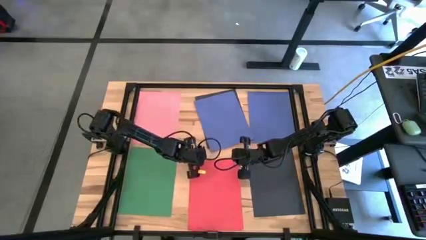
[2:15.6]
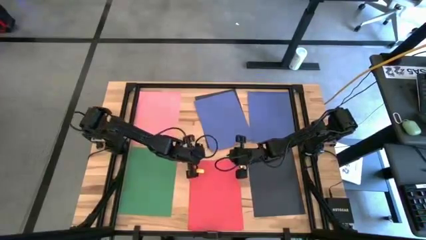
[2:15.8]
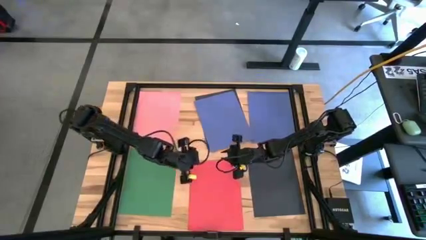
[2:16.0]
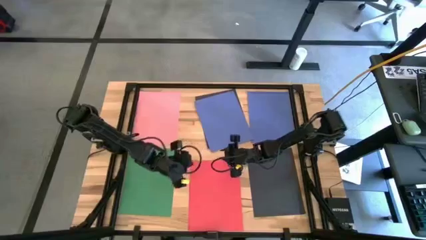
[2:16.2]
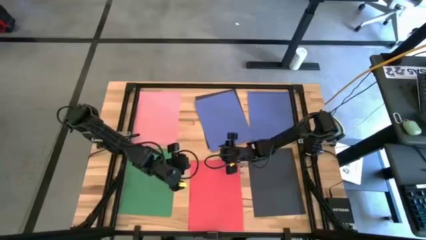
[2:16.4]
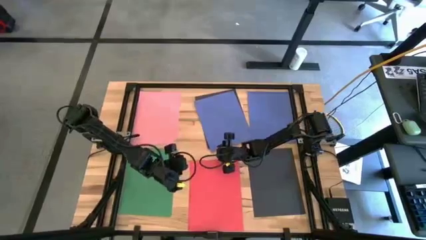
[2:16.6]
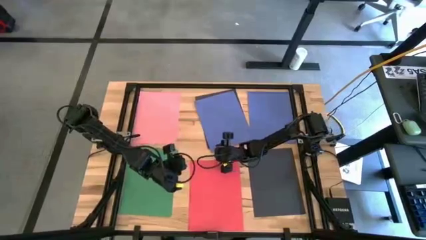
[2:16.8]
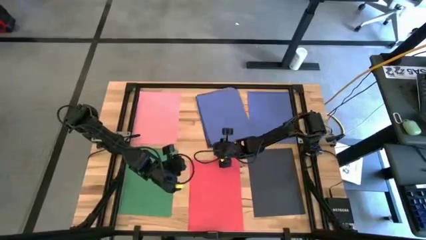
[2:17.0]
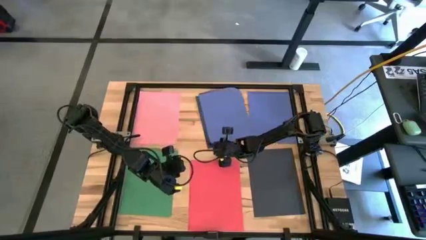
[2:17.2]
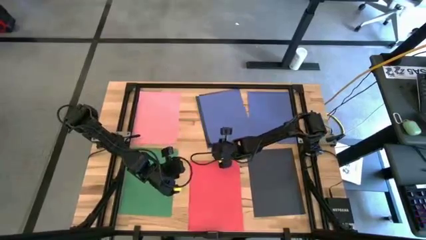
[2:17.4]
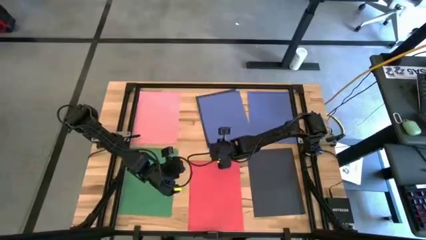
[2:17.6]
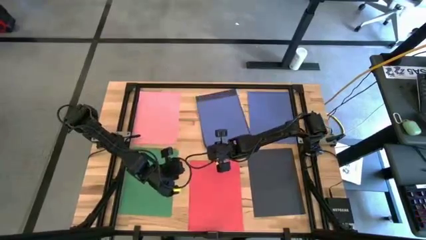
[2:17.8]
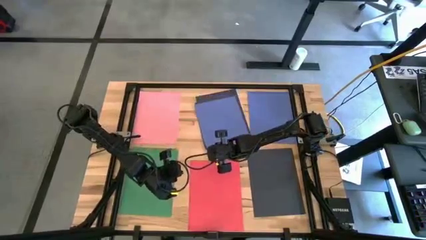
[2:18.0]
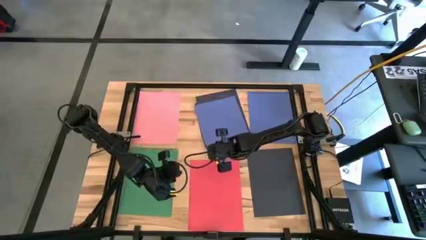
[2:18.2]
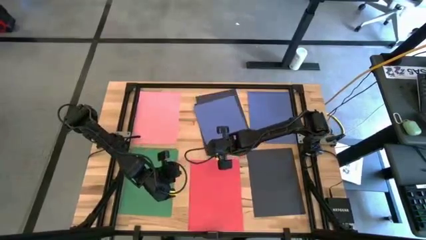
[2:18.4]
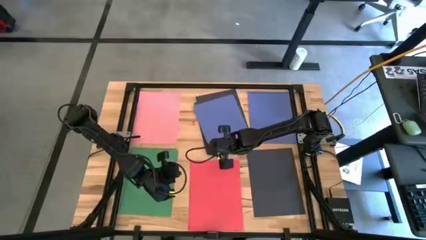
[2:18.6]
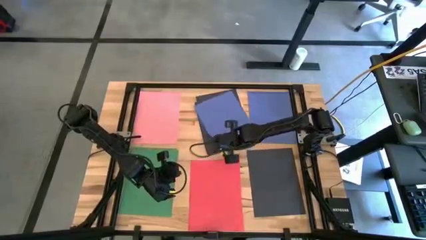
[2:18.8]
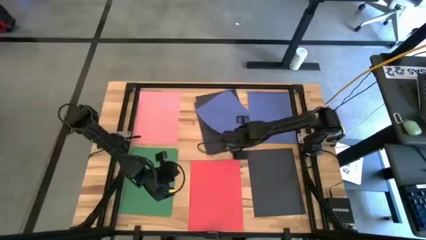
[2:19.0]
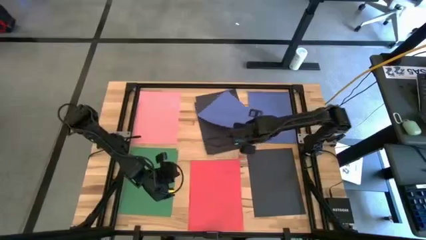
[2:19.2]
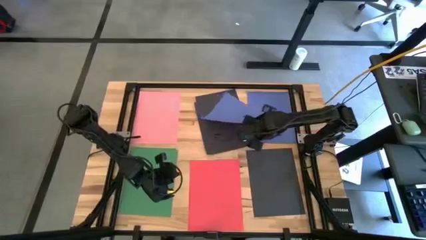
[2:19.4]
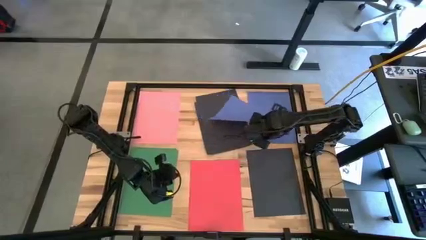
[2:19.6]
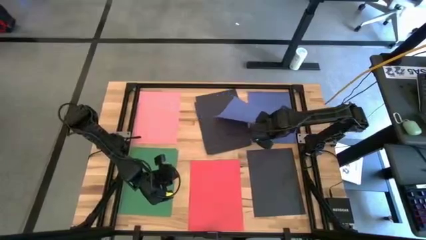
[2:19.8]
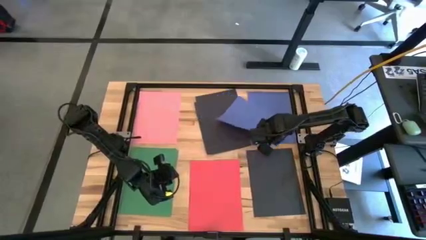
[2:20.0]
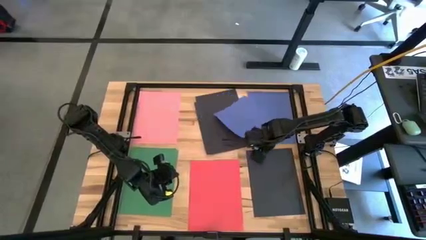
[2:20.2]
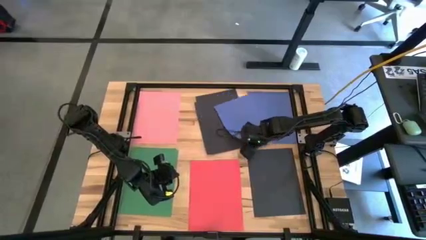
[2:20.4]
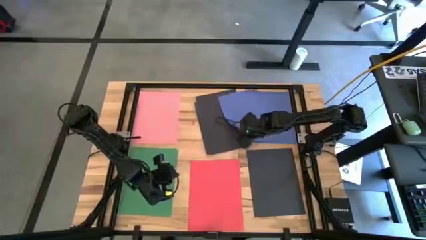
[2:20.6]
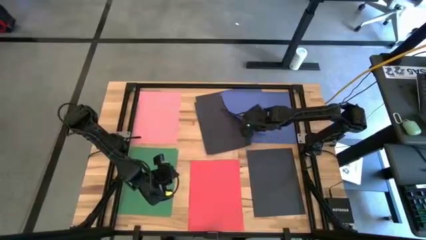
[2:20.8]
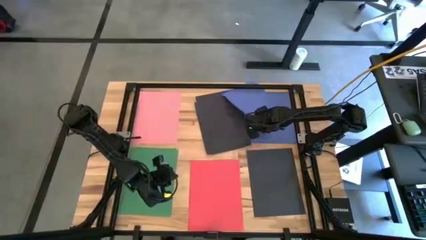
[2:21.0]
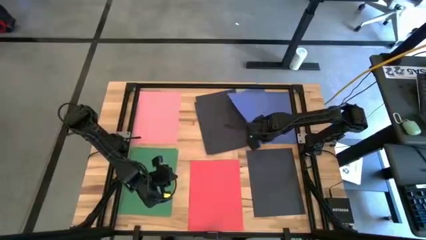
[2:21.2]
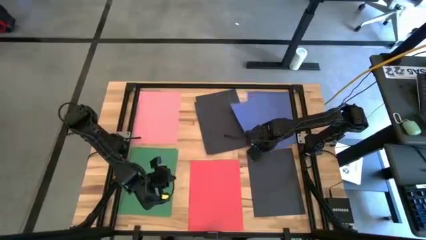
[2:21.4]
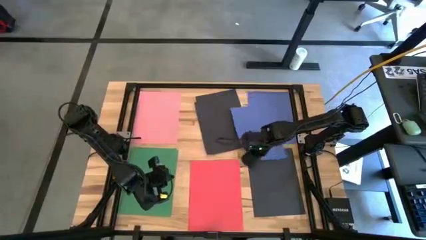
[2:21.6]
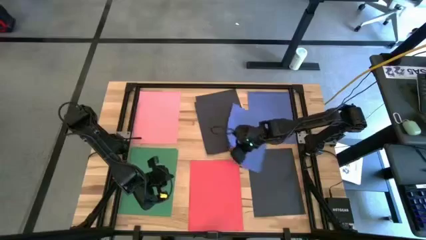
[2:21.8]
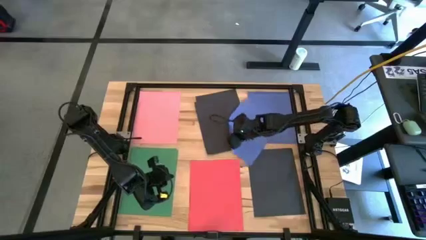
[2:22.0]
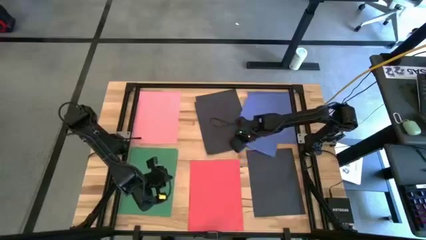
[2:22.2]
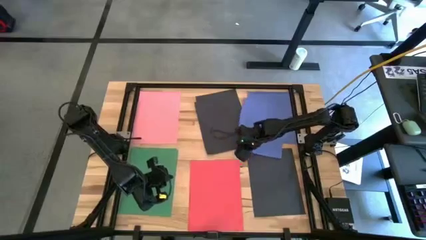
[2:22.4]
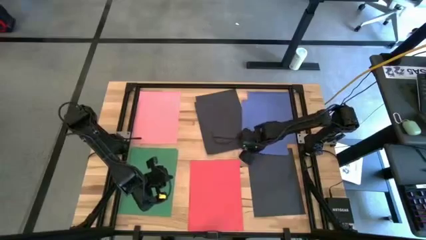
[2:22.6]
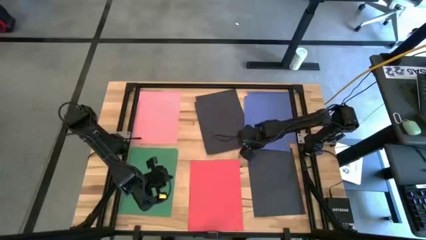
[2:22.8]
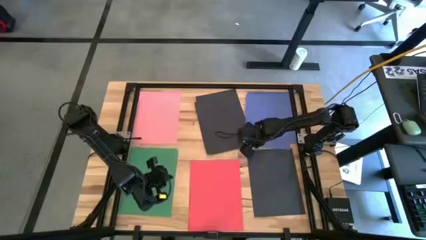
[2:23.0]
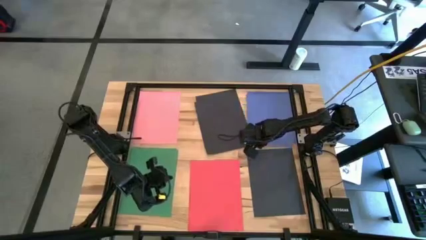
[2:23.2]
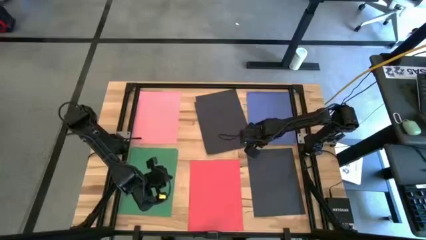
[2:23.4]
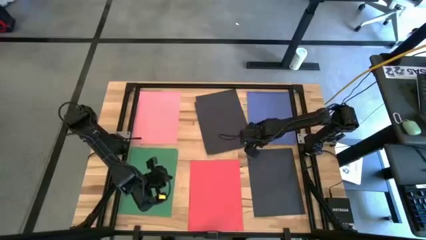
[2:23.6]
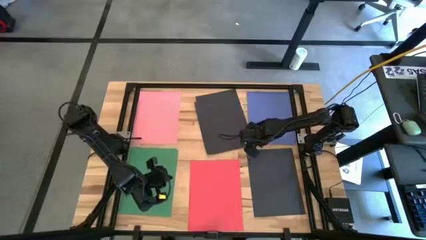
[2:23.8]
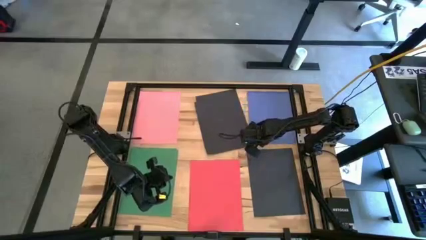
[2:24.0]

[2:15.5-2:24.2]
Task: Organize paper
Stack the blue paper on top of the blue paper

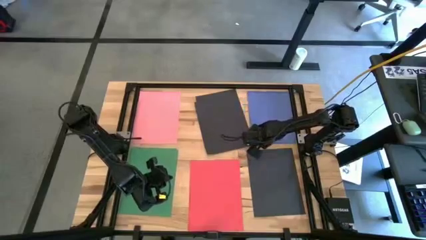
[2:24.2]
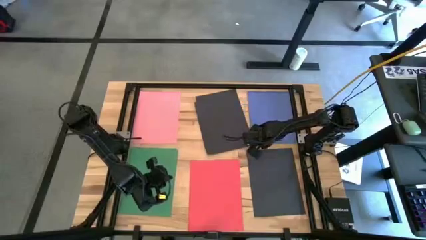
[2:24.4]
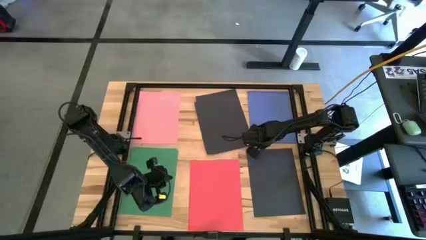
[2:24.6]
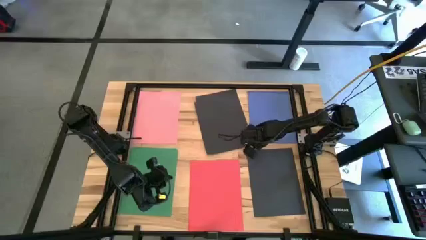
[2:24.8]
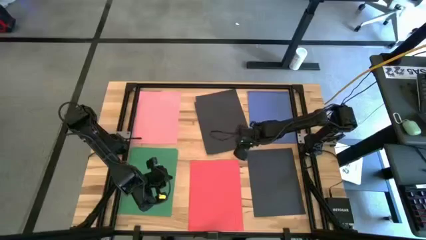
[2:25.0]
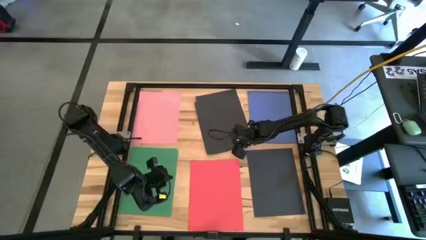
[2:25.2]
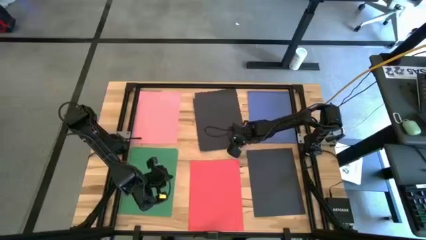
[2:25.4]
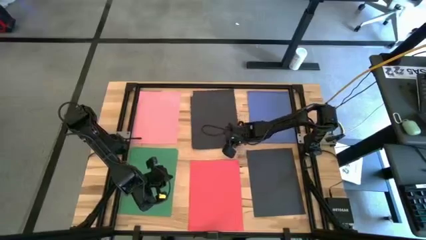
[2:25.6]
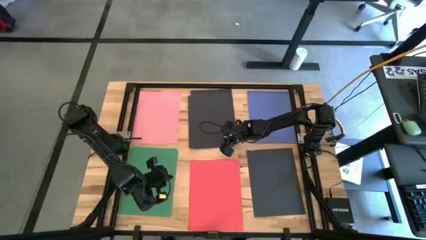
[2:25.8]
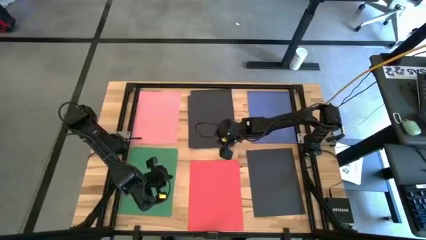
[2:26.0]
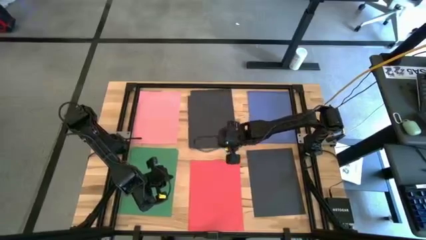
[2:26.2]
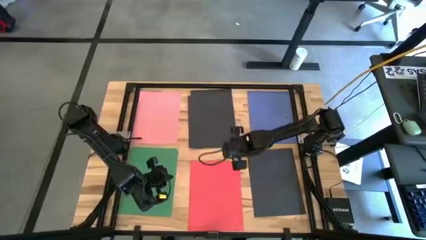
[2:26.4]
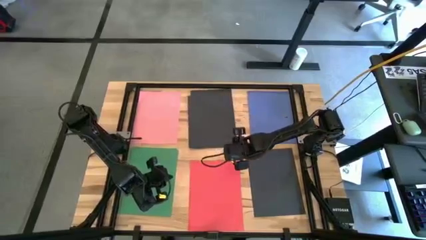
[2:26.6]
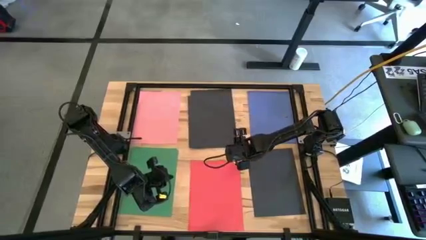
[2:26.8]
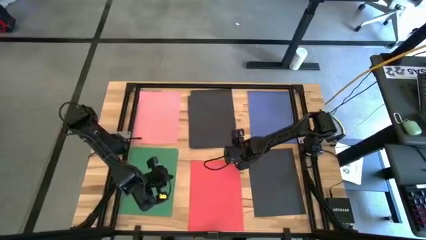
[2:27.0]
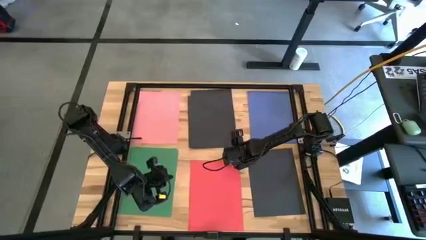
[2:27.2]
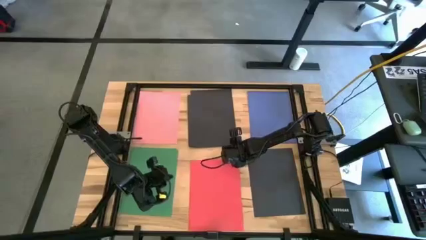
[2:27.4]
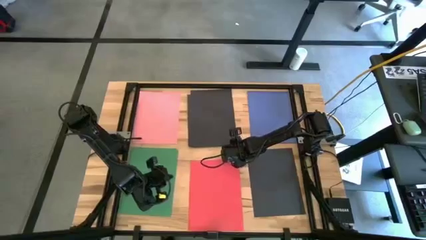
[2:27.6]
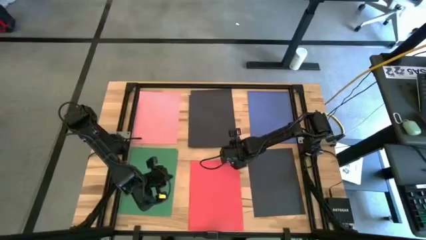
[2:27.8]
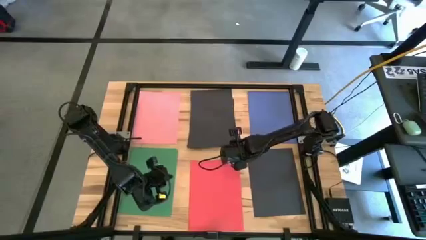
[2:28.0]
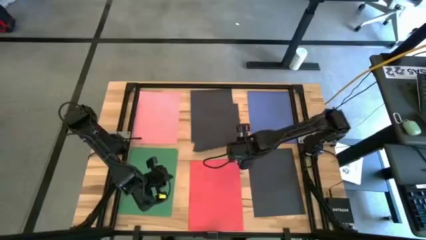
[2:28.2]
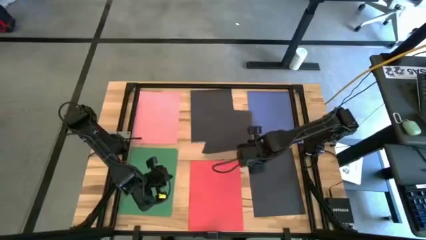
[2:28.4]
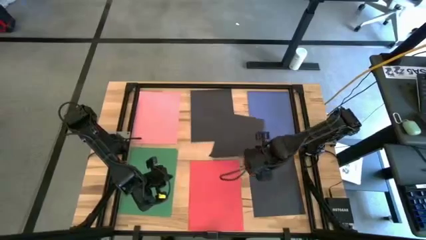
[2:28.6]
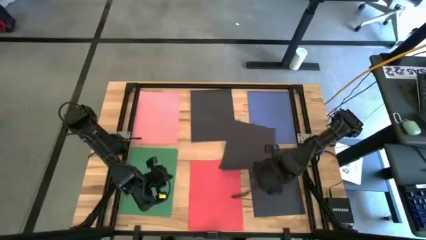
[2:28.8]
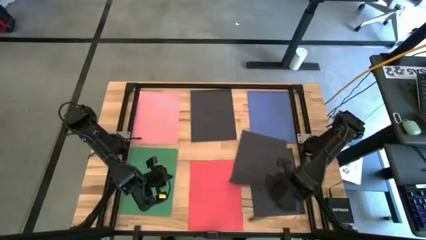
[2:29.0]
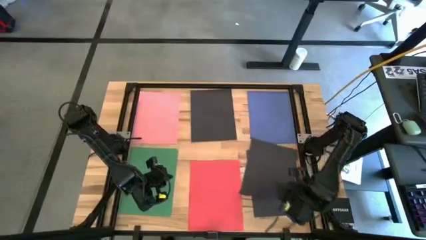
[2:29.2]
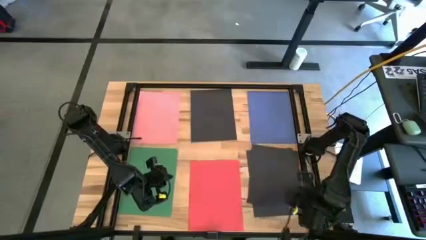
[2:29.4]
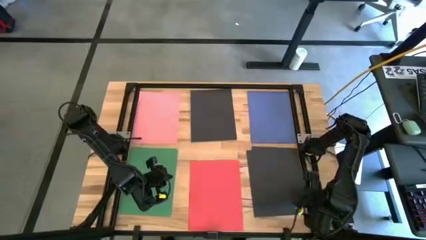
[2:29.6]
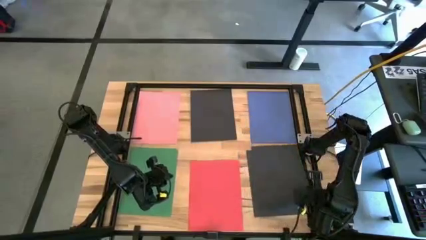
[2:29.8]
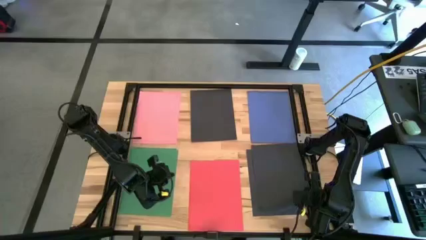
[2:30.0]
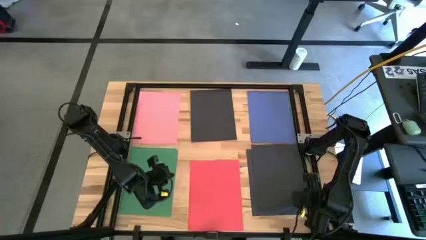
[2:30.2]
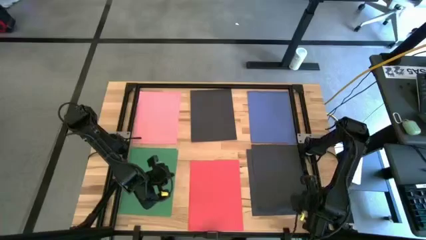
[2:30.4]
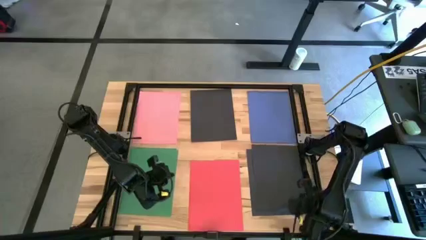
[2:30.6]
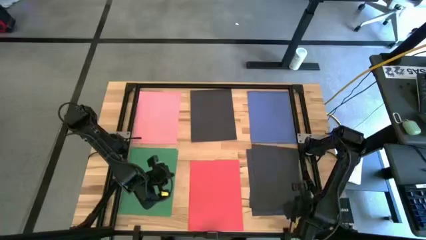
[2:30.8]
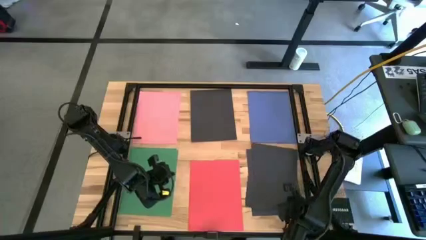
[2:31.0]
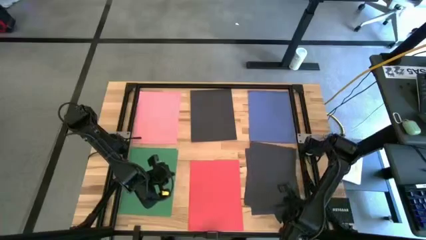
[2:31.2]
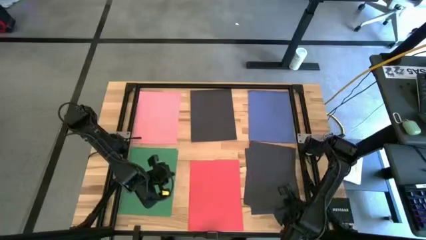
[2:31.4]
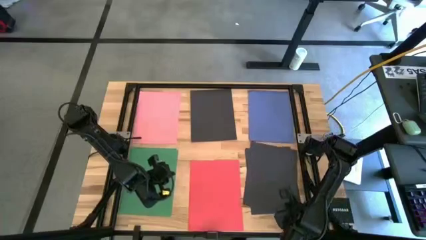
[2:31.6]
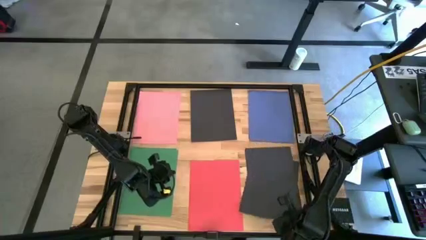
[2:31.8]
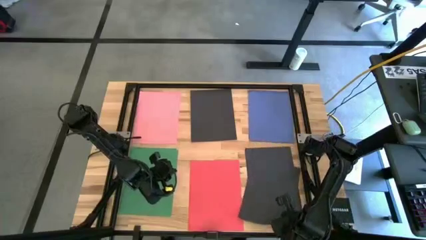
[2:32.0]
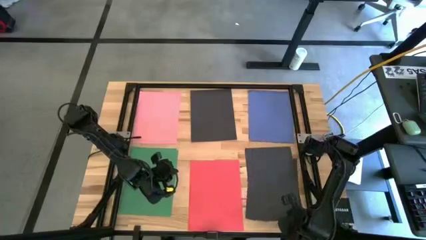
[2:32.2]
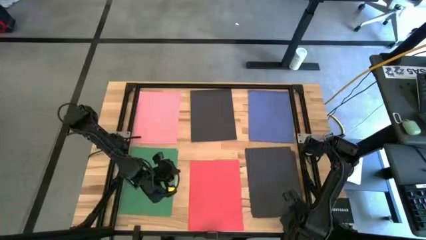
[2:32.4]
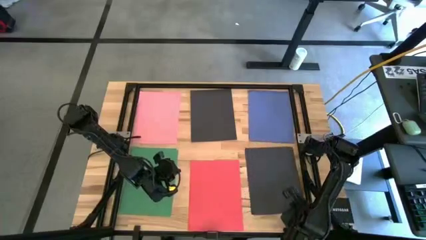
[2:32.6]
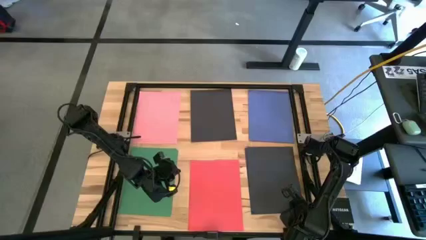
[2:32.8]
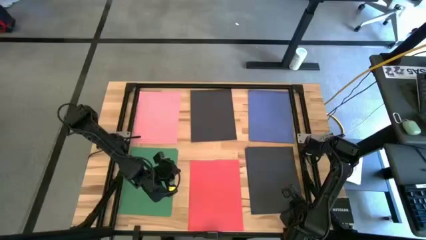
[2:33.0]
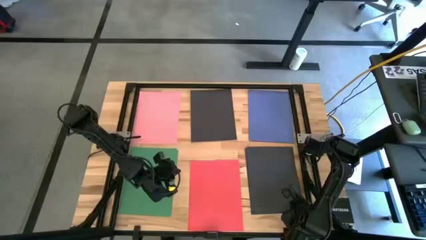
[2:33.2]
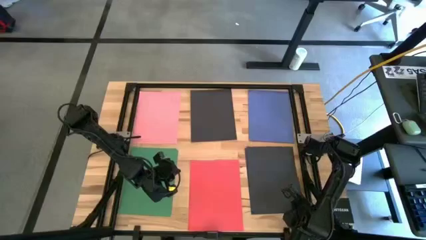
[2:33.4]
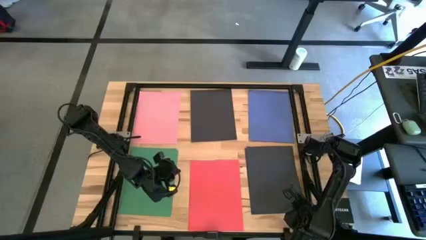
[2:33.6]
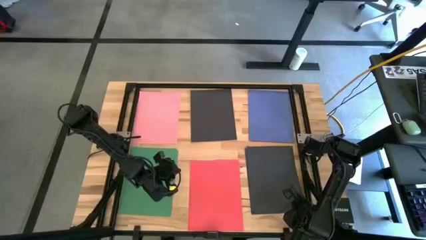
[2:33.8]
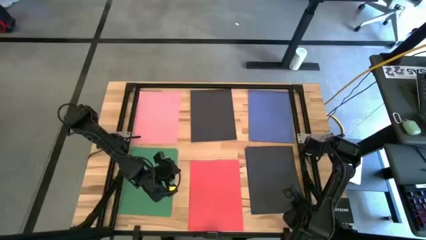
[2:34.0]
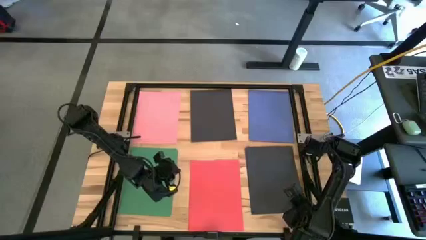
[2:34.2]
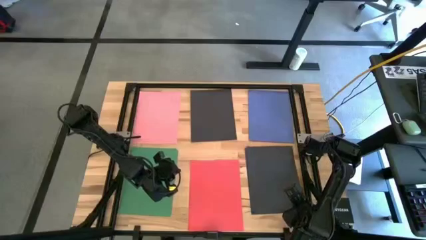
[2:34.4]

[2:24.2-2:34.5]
Stack the black paper on top of the black paper
